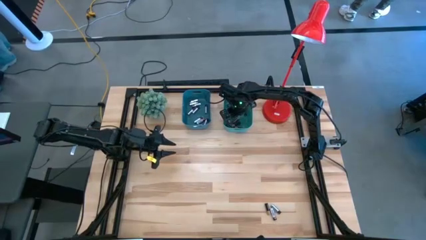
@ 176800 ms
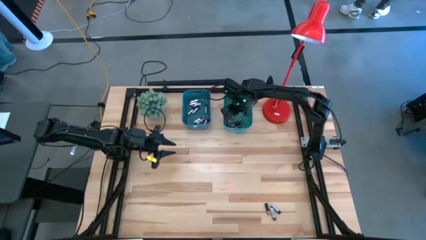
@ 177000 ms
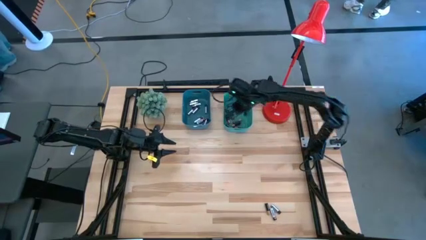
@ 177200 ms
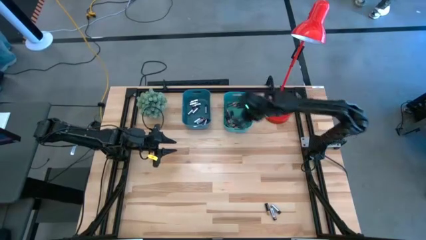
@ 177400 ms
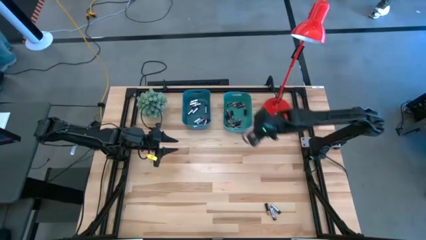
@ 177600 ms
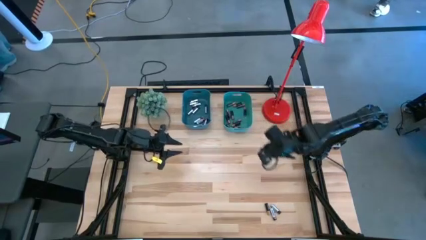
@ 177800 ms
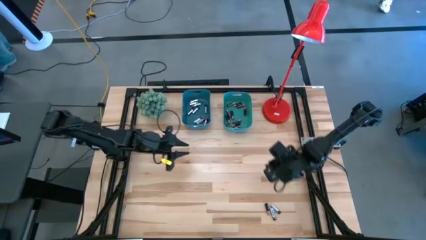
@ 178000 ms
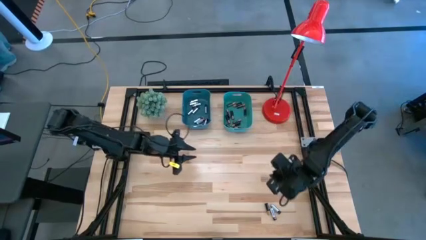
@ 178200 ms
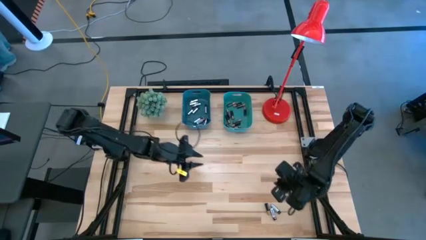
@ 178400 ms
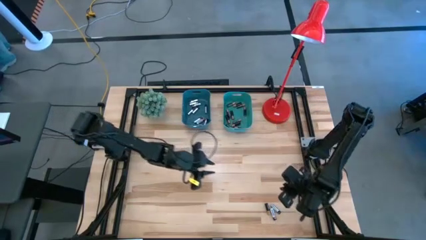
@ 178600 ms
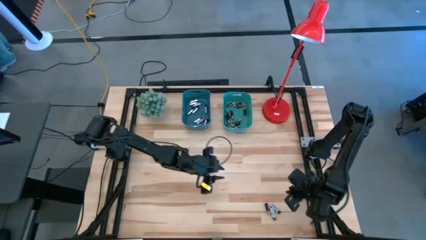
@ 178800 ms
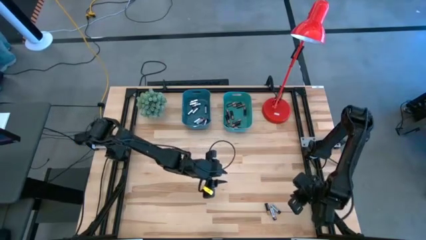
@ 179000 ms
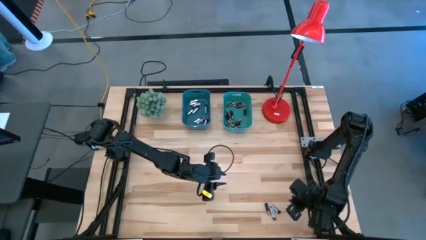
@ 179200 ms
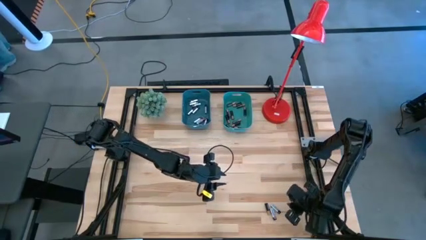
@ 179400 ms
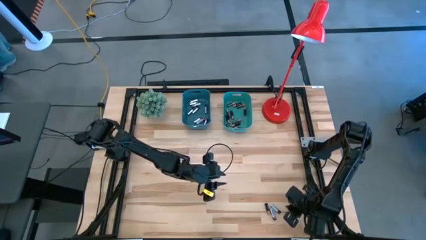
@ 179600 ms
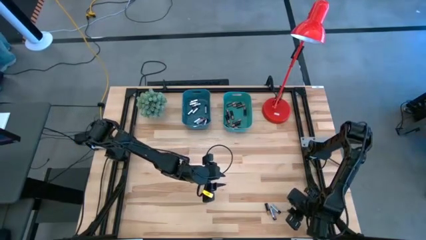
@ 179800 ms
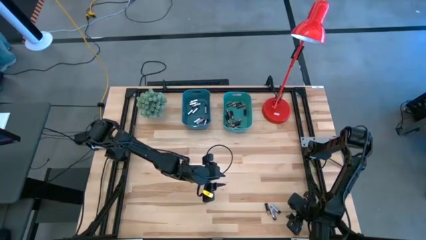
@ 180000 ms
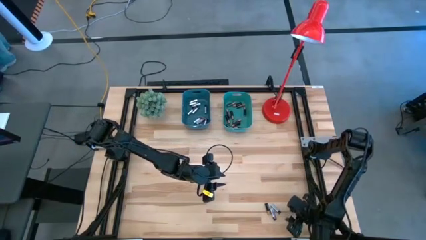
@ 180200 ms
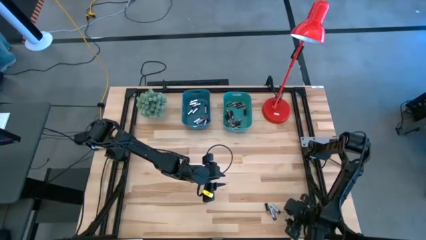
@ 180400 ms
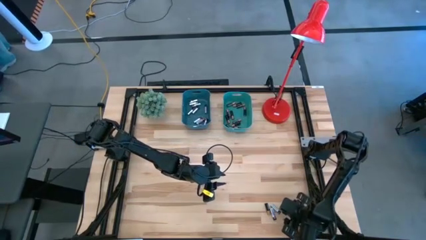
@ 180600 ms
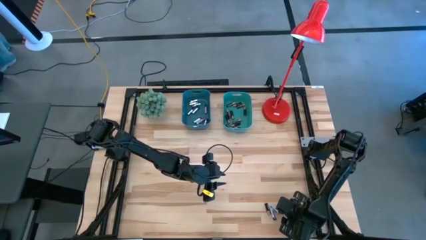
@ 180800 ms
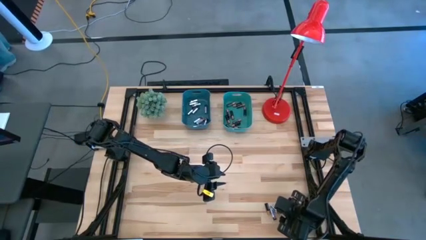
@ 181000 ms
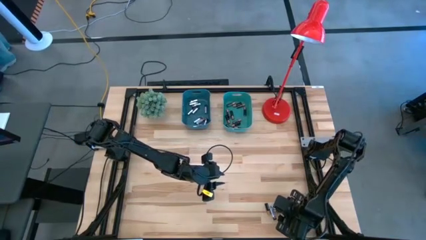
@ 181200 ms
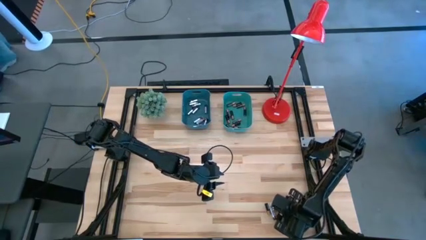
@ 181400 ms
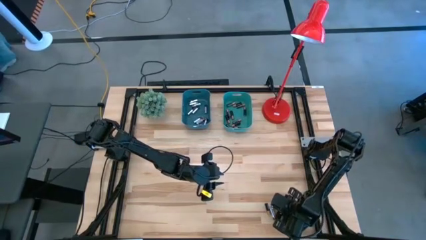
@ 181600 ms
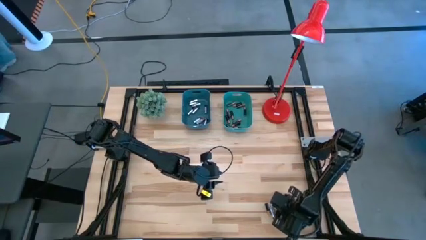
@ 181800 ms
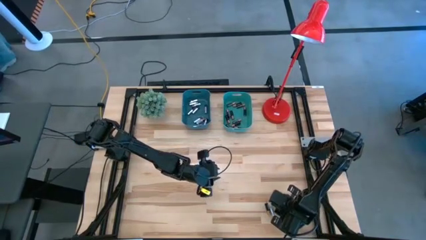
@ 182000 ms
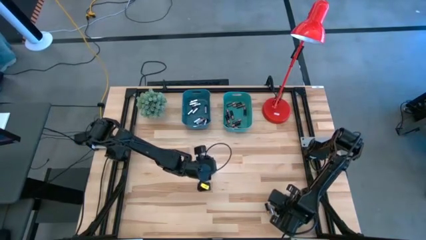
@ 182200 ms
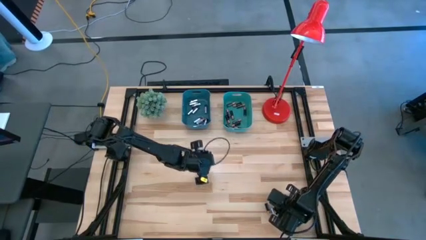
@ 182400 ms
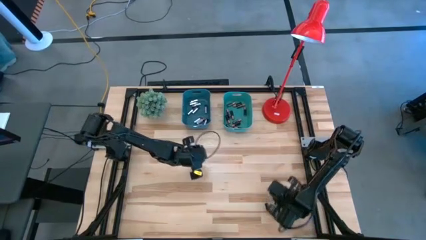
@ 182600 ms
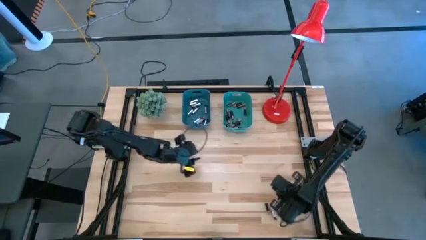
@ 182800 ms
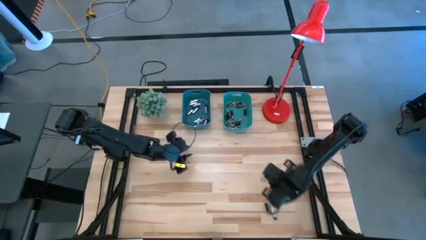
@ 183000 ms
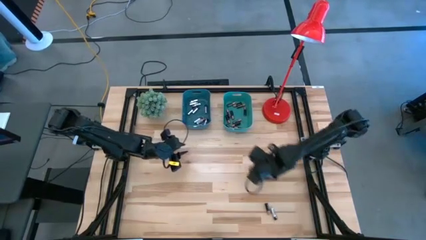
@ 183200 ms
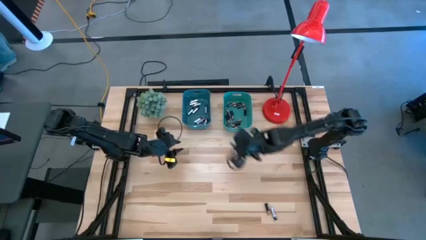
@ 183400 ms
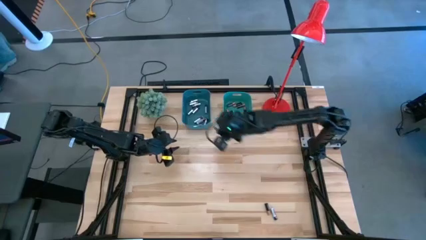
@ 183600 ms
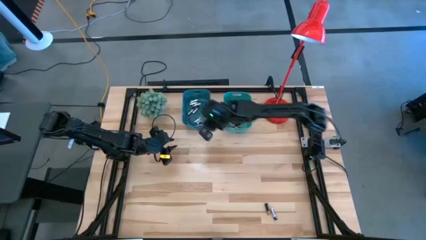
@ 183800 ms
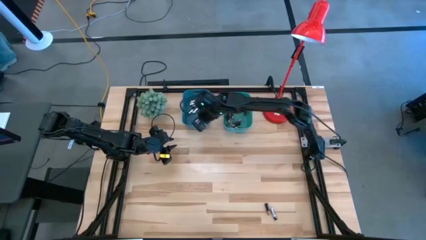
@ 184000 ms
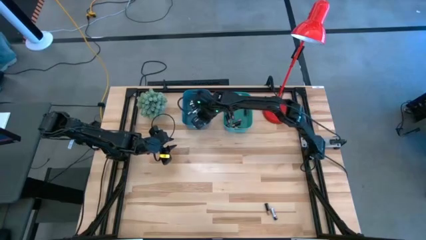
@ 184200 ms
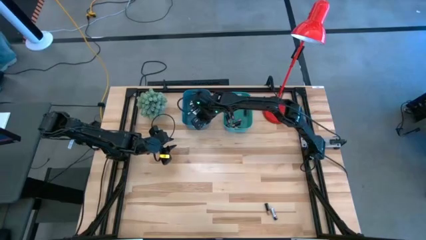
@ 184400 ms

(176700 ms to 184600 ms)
Task: Sort batteries
Put the silver battery into the blue bin

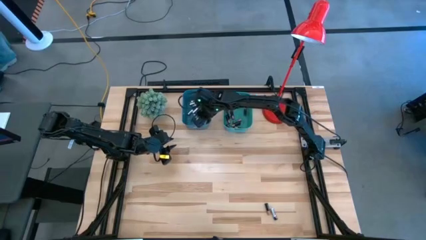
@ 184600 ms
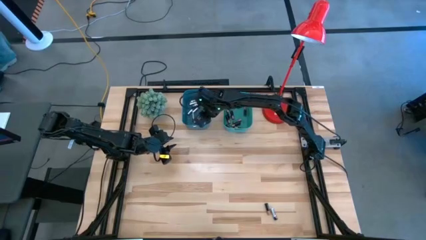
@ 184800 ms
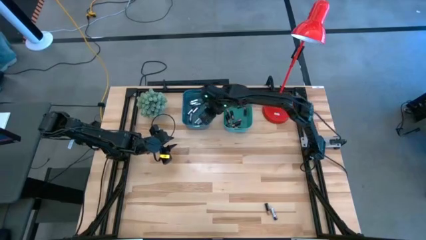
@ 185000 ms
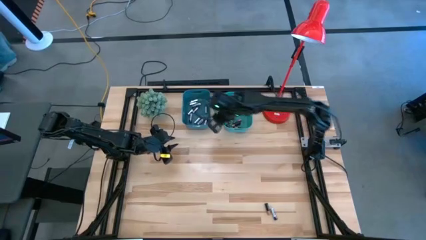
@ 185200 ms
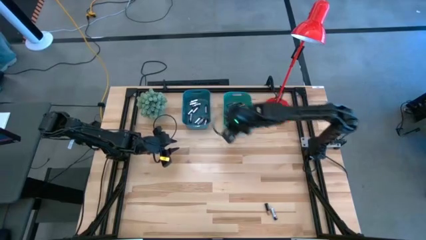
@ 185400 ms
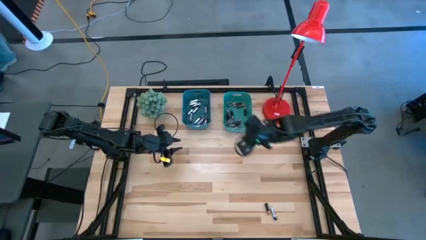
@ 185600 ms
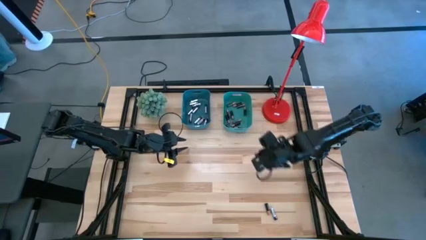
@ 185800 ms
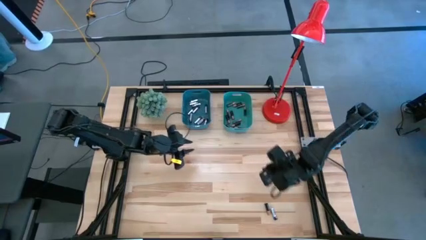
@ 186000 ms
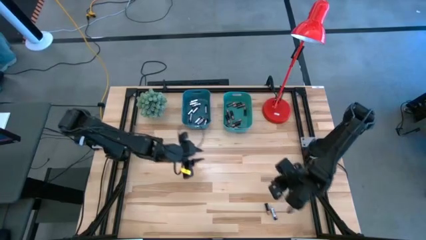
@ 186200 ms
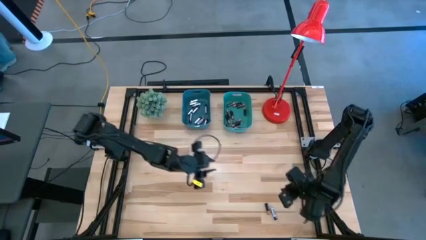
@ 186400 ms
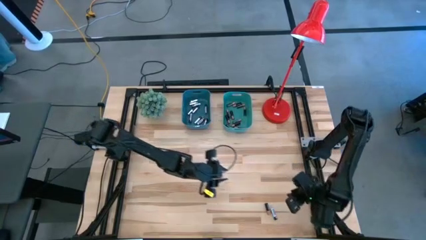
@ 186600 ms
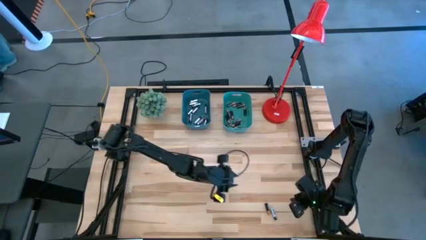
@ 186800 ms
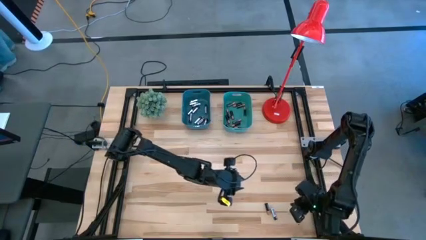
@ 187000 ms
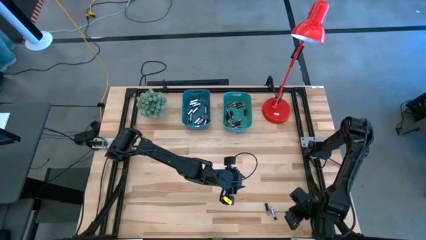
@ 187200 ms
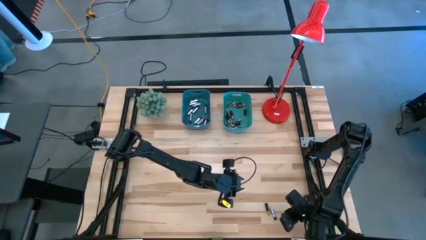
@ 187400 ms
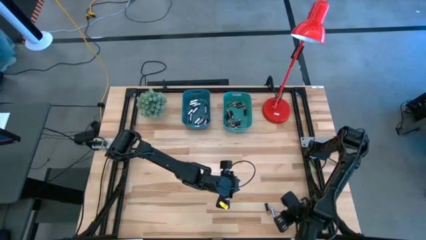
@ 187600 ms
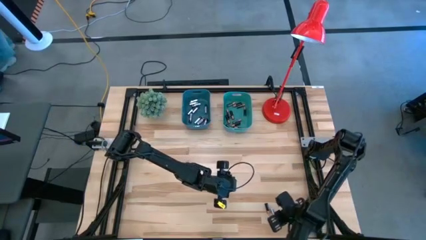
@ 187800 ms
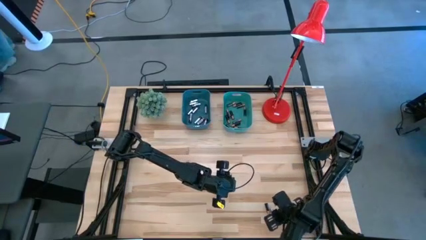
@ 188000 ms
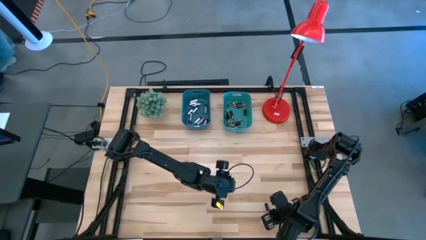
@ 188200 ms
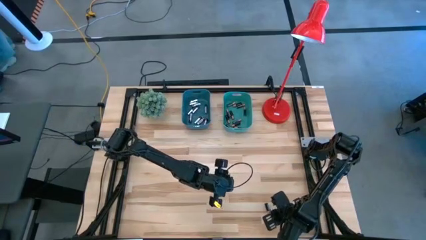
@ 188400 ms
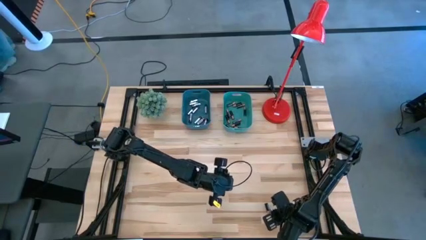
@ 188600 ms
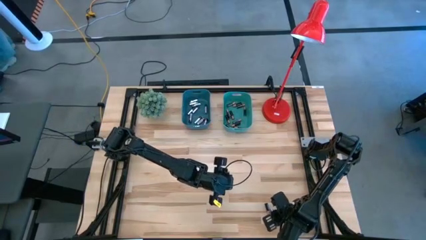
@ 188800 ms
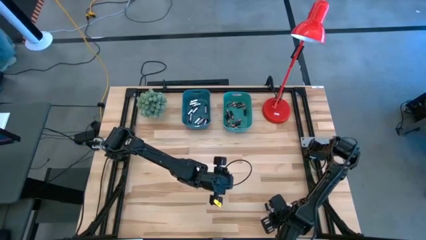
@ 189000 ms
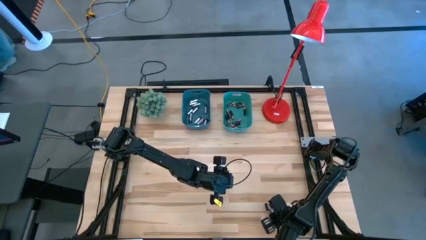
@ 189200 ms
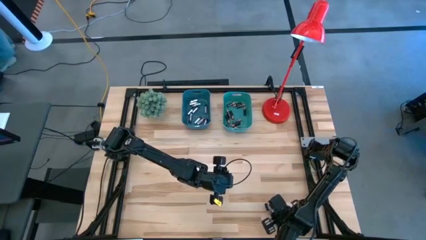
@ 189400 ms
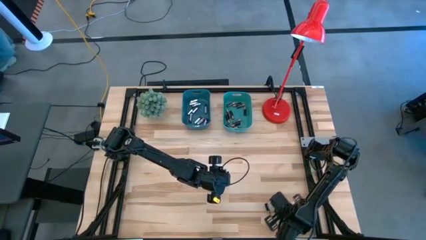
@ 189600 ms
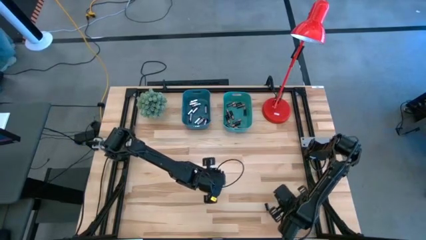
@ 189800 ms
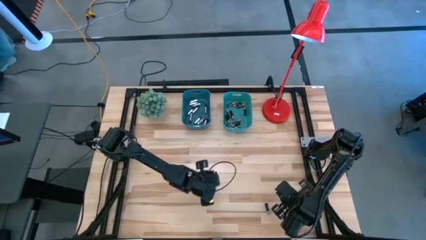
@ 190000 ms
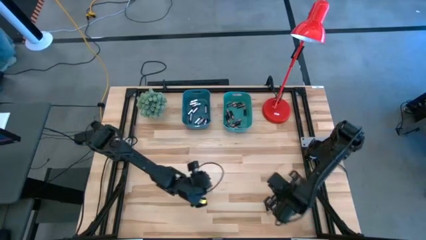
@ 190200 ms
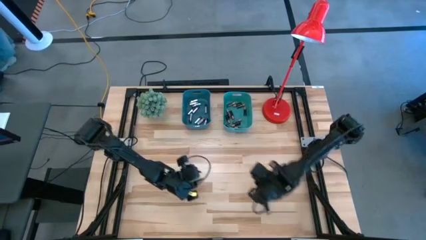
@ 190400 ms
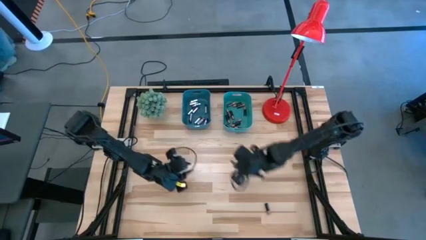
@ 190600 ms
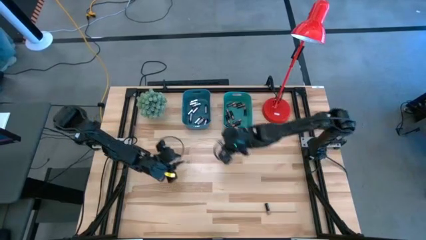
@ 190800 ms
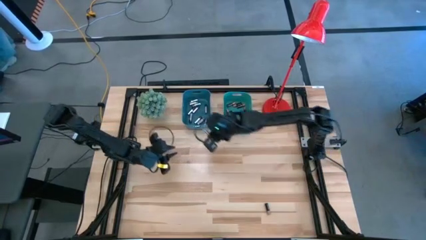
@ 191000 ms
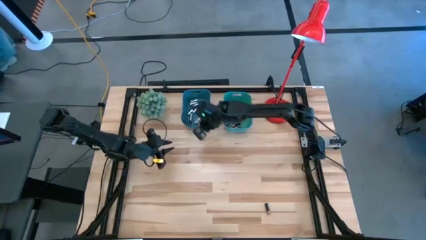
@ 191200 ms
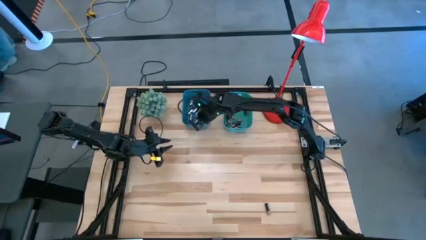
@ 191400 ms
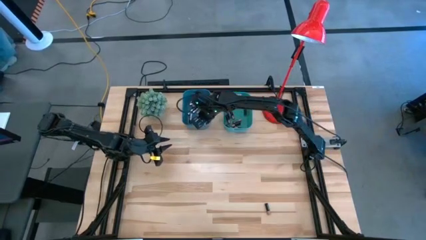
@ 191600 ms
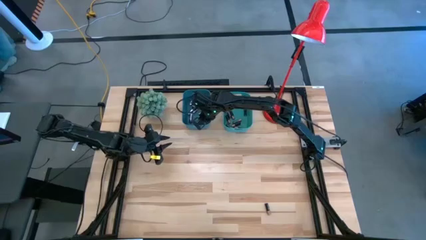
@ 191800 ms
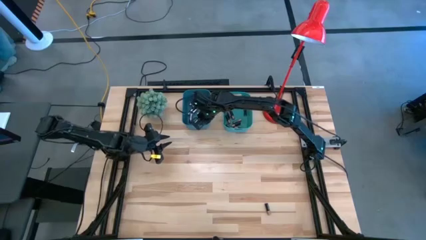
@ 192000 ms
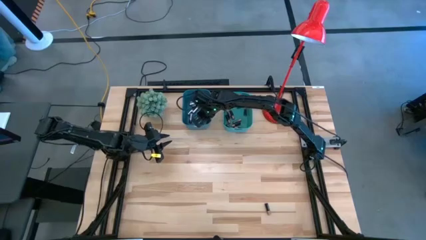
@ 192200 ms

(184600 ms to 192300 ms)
Put the silver battery into the blue bin
